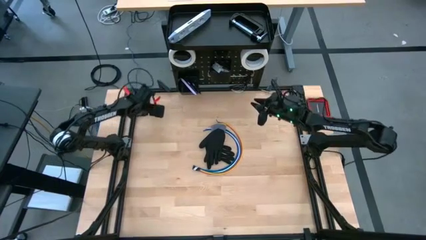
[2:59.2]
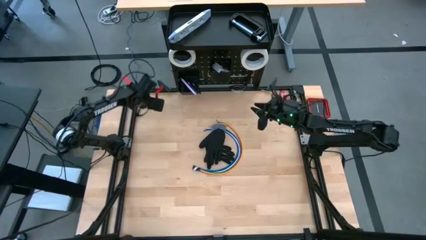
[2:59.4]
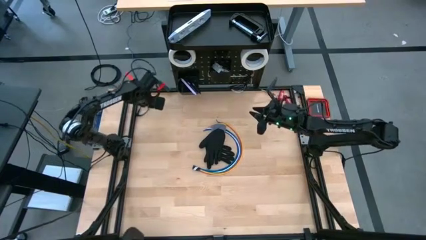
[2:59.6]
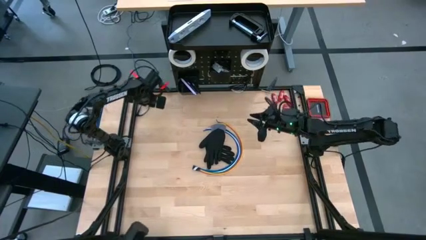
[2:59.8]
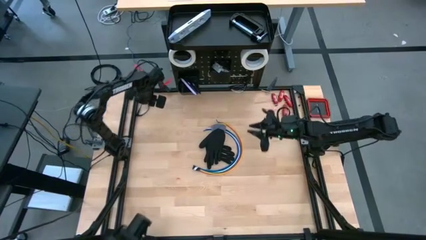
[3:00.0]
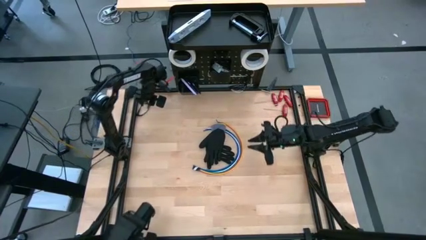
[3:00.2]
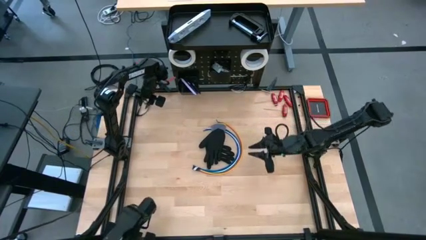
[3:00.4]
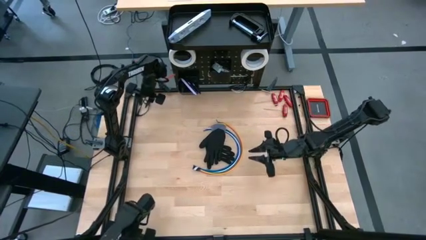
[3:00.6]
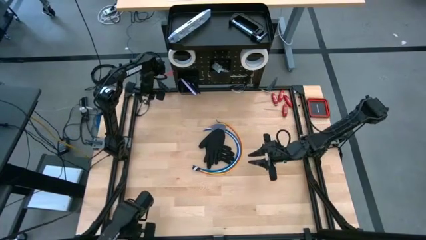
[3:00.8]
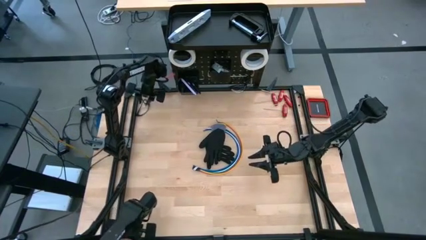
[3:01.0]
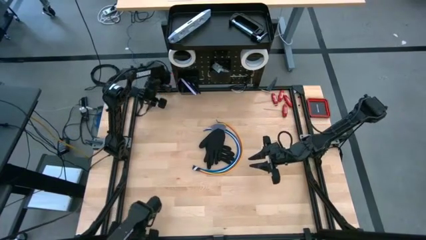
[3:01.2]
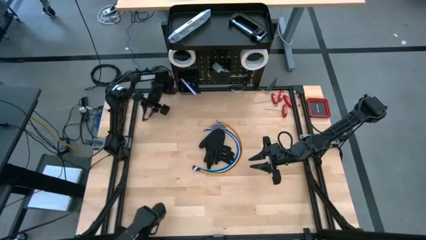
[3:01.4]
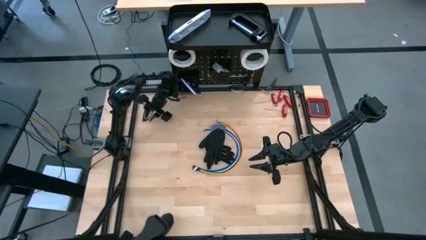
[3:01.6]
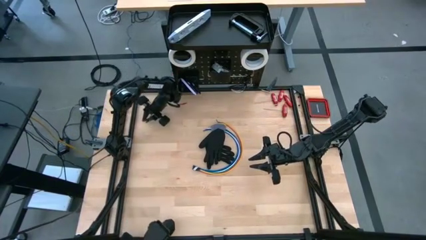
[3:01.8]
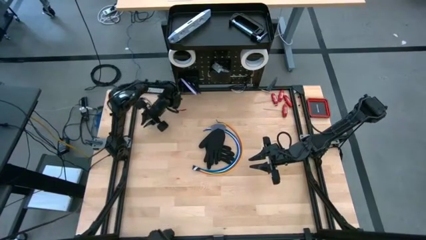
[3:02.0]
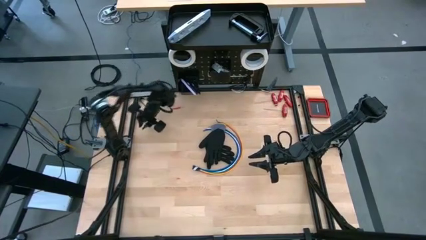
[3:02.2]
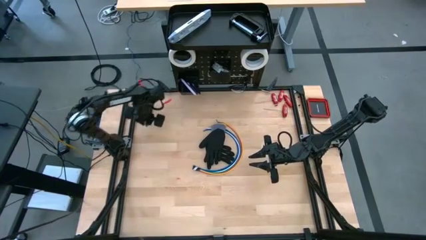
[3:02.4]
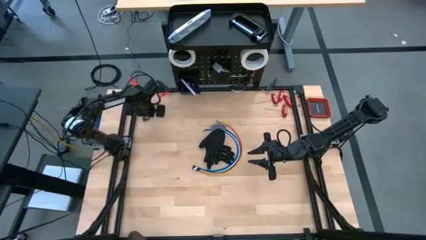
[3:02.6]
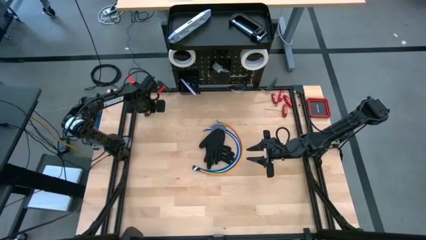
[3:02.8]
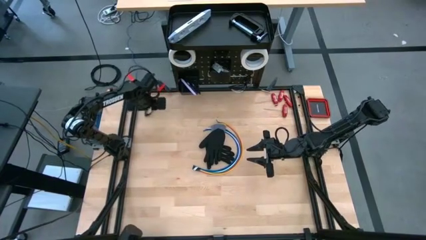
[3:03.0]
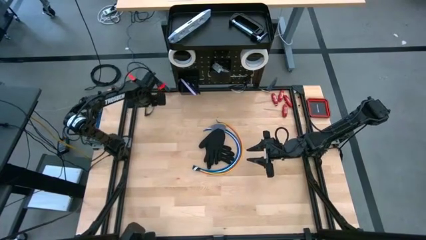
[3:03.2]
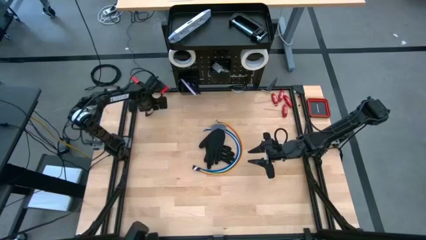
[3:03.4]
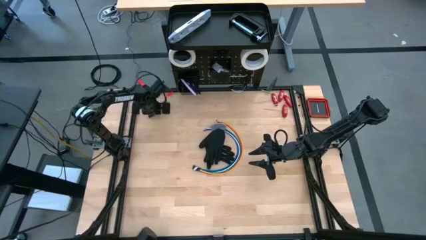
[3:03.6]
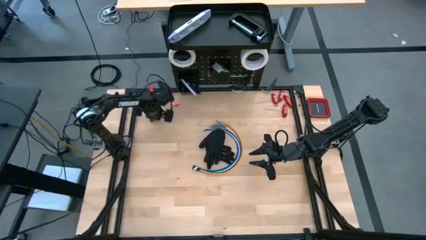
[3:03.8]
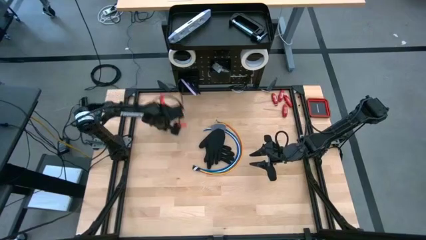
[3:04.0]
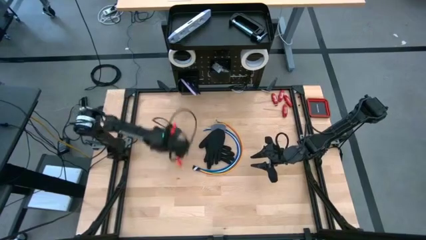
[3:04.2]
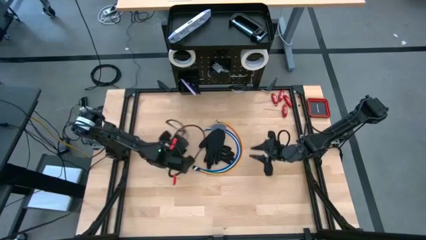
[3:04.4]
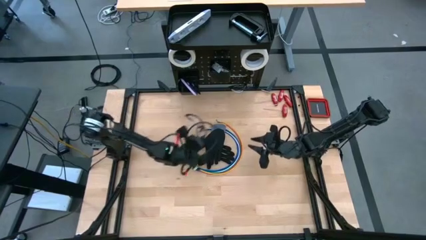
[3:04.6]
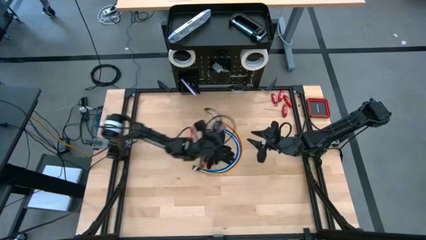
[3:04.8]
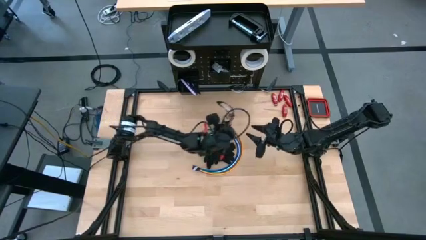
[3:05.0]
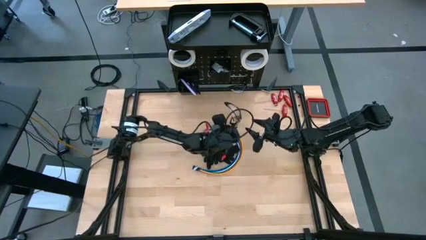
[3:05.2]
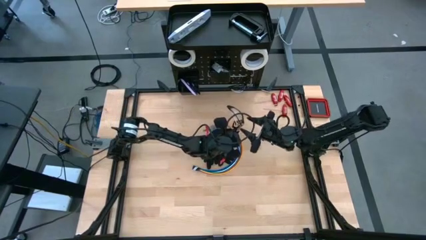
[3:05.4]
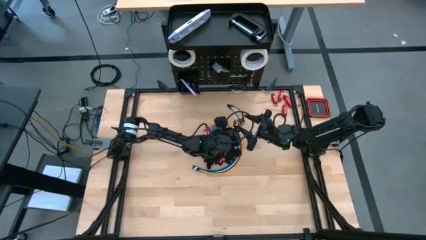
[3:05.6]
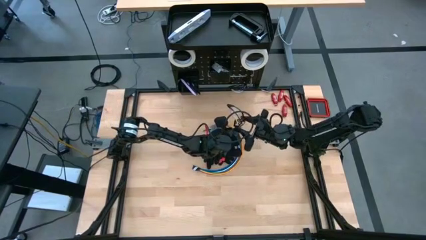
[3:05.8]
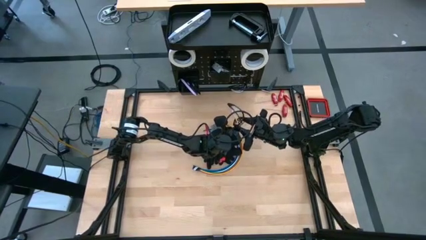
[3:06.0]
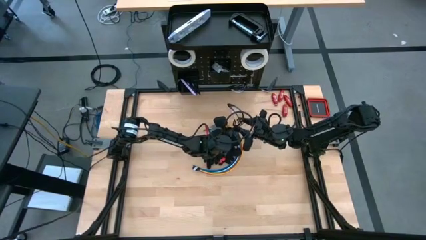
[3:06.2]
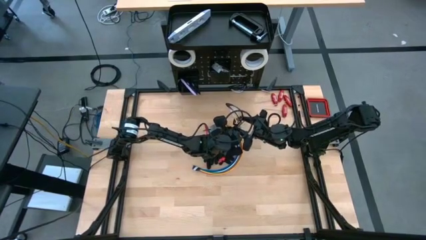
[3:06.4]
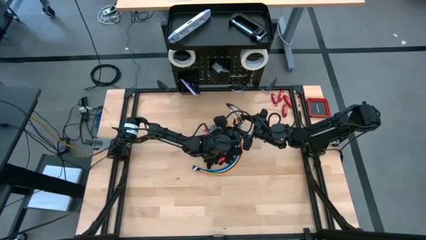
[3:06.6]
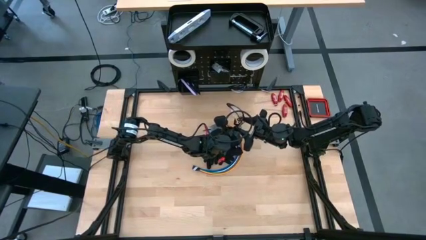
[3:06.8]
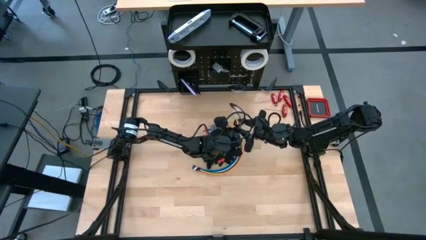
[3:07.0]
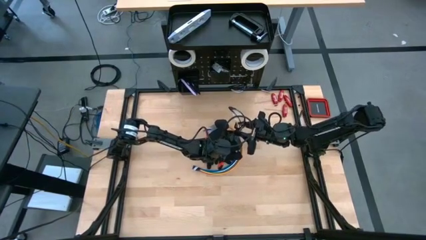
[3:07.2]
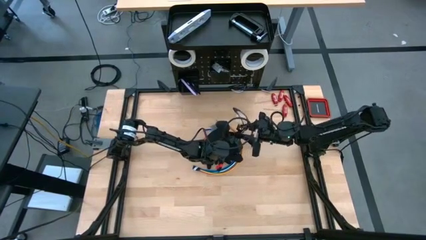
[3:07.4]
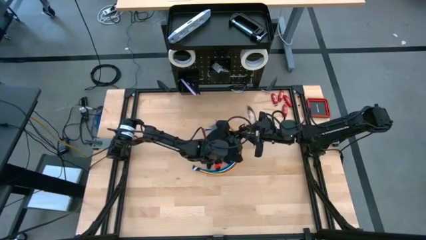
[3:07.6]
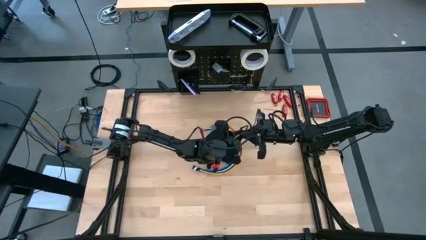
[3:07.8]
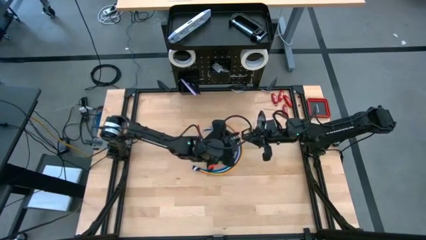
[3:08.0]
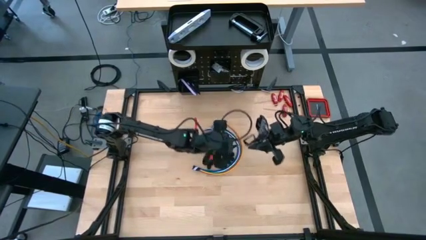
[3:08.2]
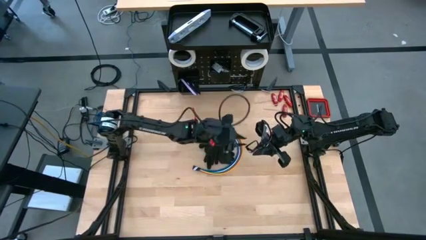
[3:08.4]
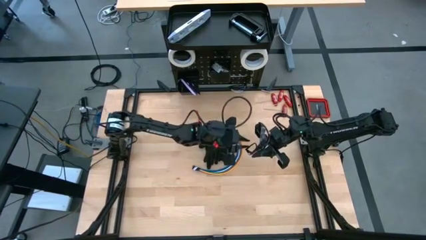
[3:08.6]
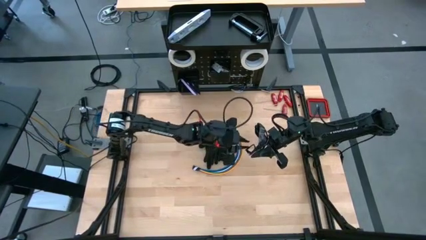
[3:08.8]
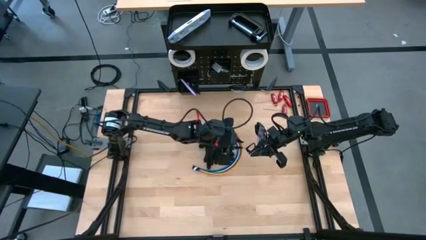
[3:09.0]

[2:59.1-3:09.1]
Task: Hang tools onto peg board
Hang the safety goggle on the peg board

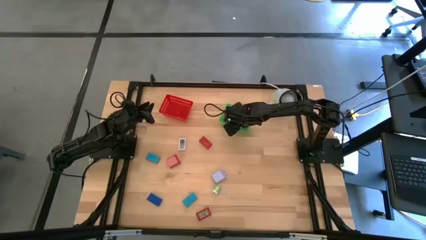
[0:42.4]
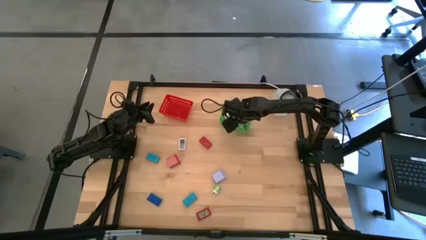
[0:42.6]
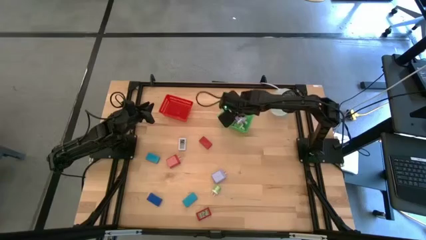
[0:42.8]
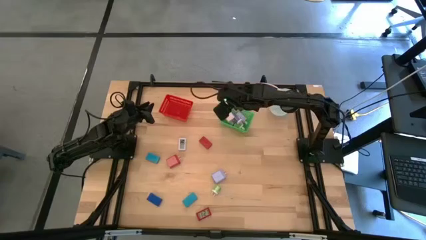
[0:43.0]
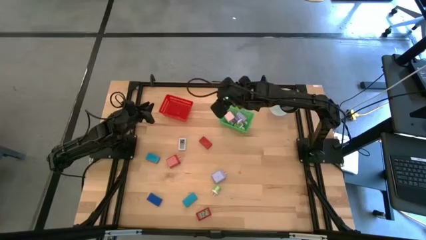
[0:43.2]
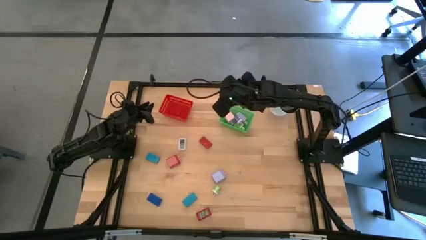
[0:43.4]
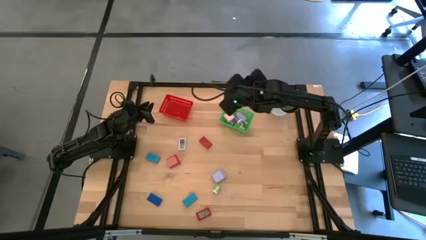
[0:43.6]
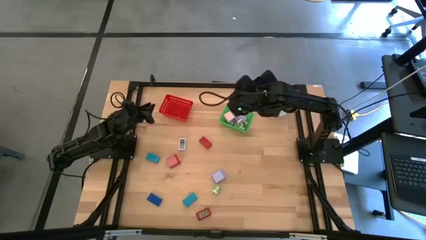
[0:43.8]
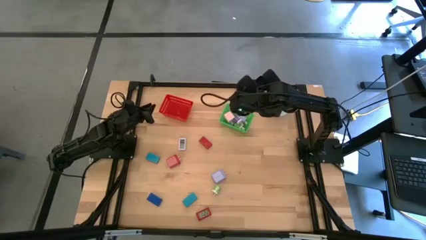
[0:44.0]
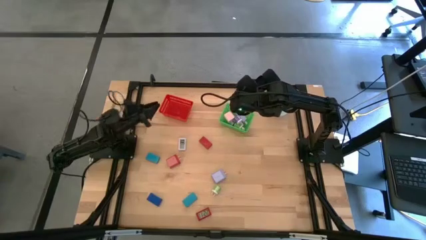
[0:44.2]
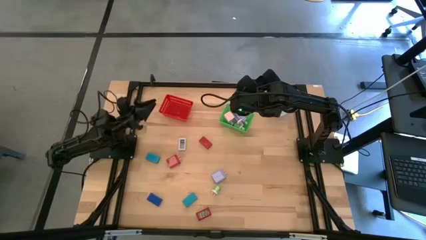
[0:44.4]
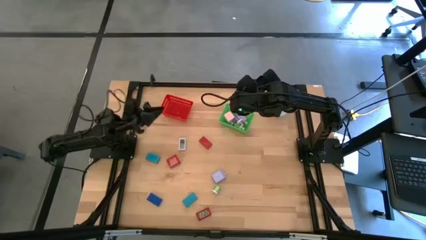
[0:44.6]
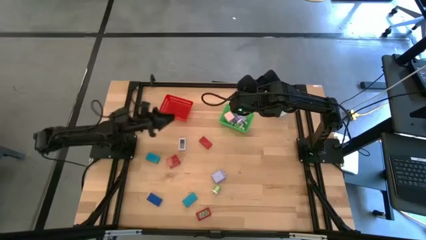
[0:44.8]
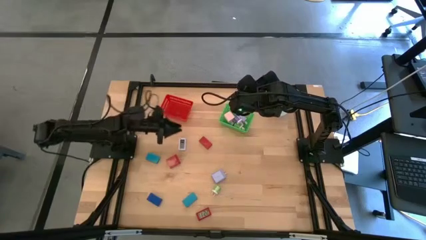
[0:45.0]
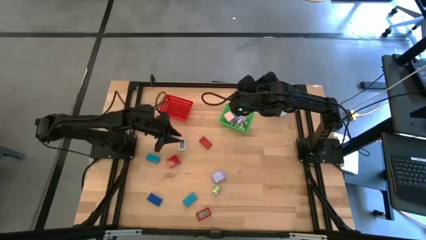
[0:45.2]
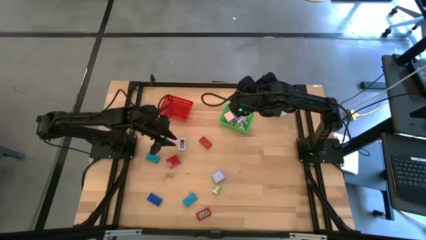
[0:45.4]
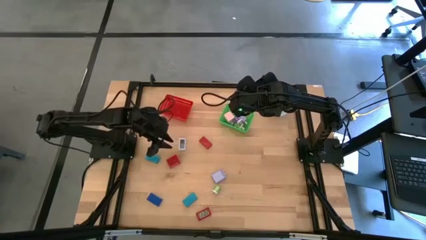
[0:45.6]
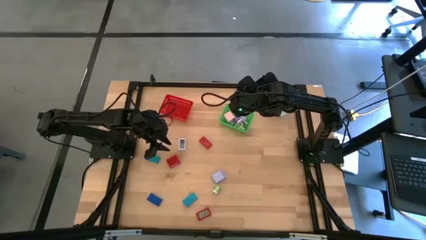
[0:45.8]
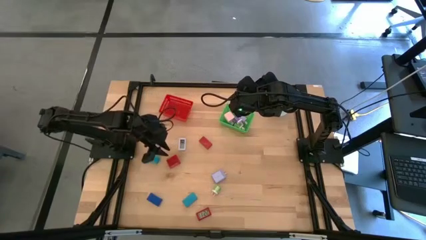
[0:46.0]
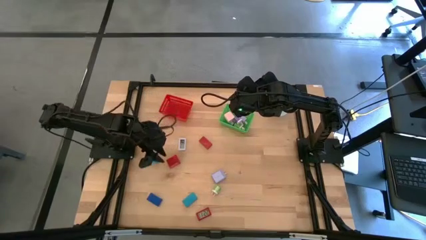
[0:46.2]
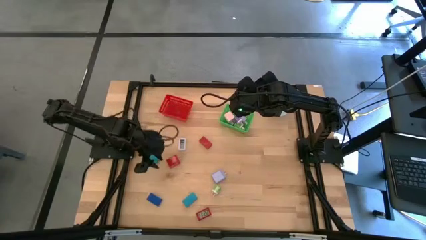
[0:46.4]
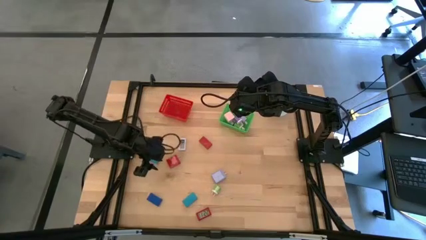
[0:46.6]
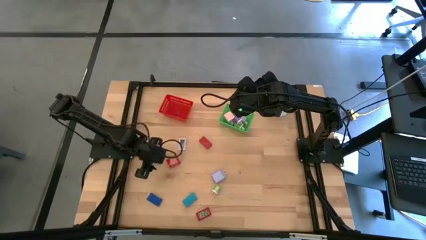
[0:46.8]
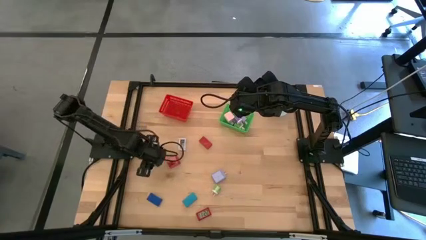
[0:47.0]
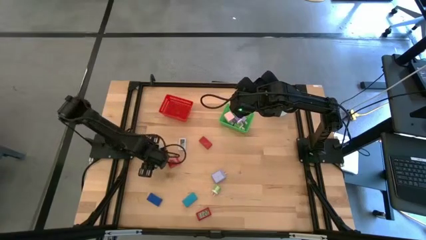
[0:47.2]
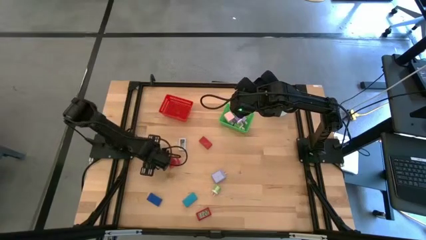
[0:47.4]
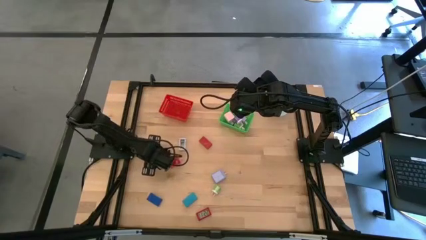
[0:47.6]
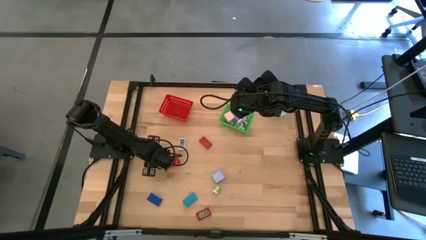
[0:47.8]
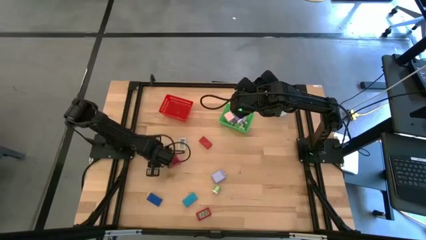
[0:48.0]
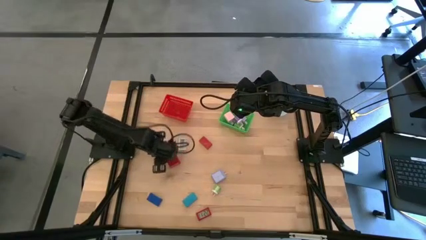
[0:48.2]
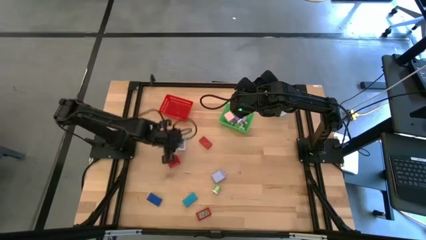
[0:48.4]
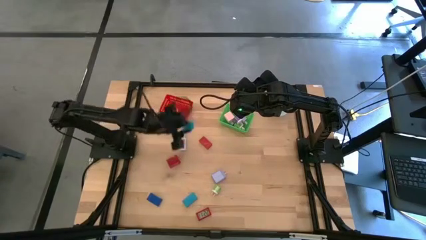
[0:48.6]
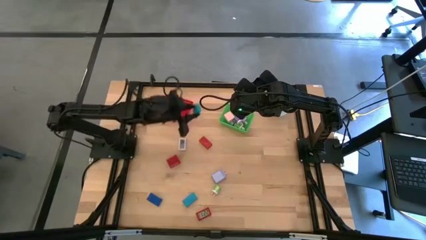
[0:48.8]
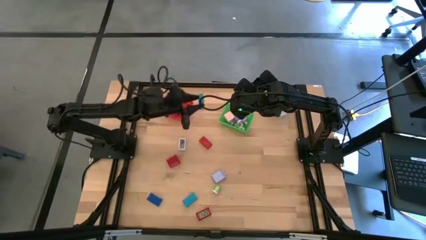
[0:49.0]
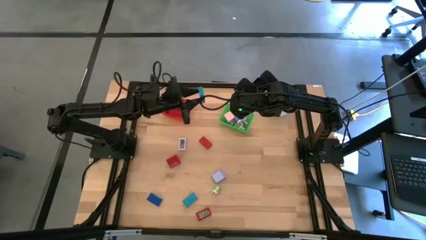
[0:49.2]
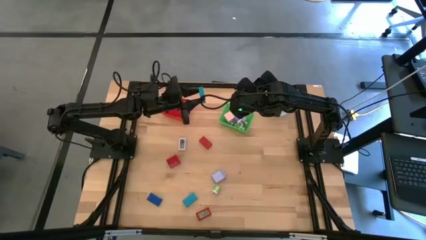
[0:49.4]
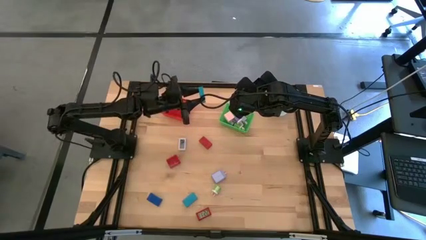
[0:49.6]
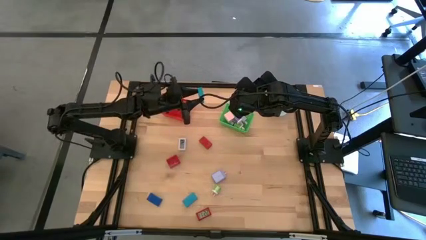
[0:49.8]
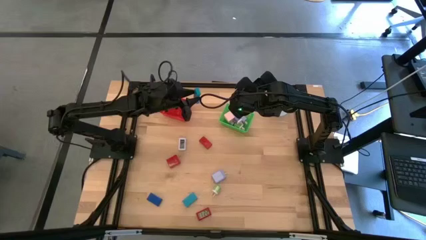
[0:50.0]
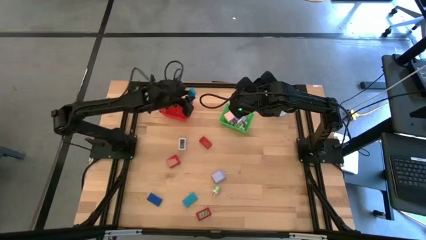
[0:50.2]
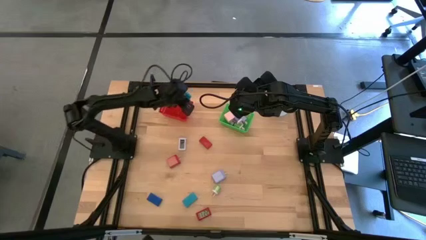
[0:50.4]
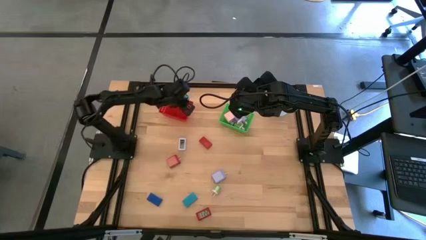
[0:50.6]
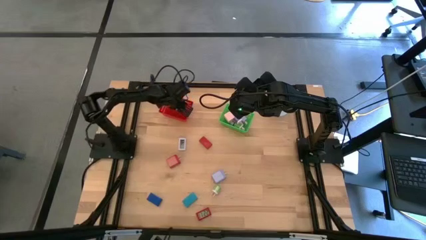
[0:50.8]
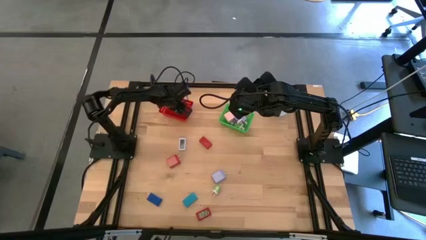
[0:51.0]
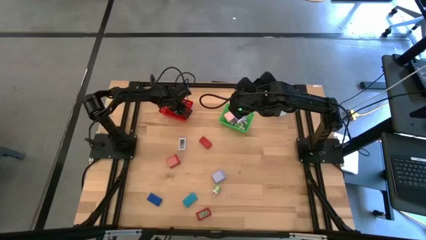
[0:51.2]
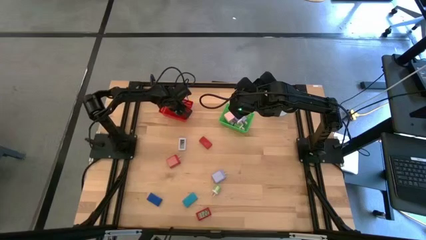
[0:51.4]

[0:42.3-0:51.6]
Task: Pick & Place Office items
Put the top light blue digital clock into the red bin
